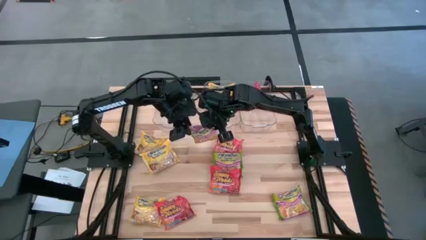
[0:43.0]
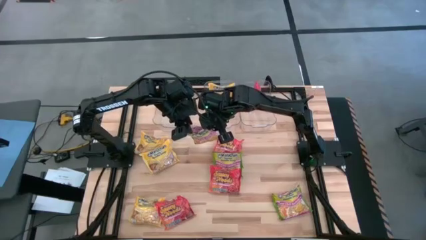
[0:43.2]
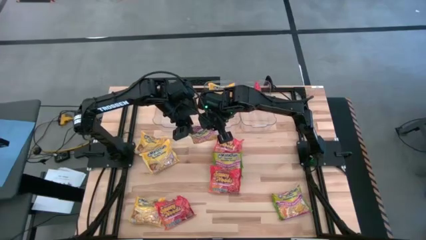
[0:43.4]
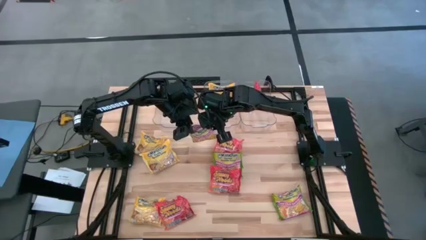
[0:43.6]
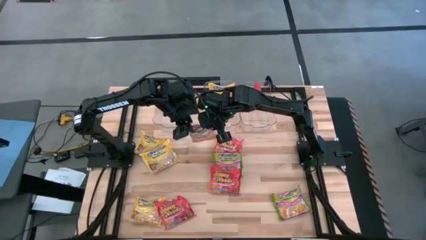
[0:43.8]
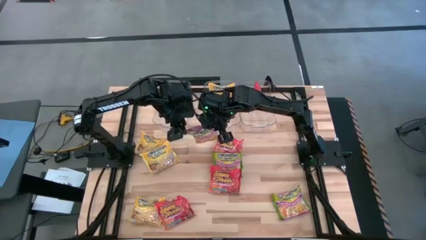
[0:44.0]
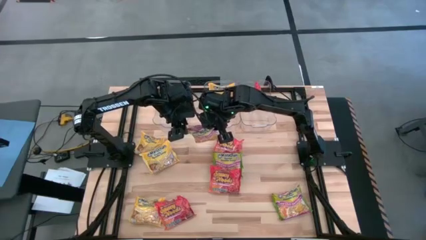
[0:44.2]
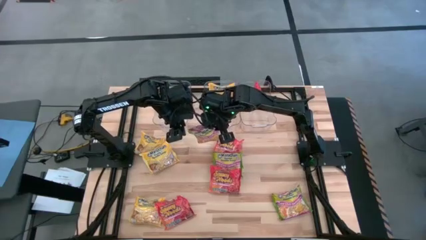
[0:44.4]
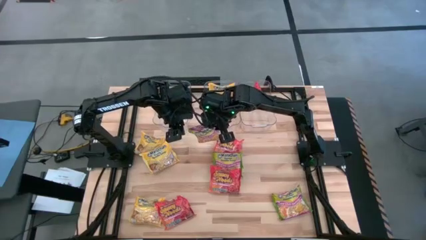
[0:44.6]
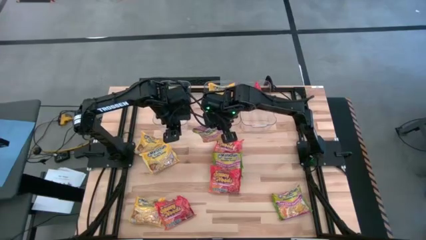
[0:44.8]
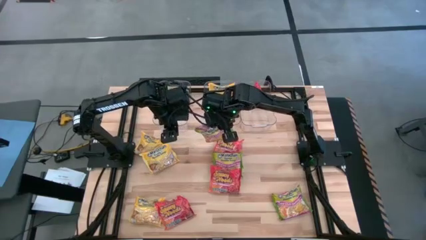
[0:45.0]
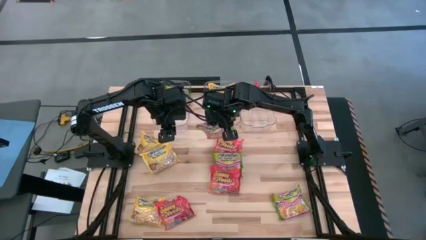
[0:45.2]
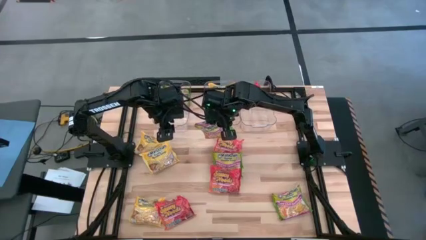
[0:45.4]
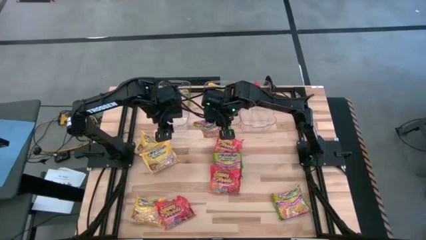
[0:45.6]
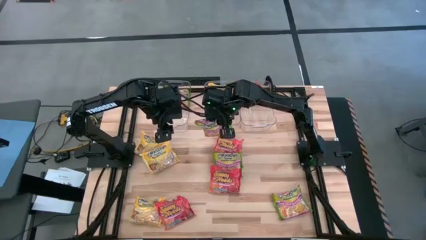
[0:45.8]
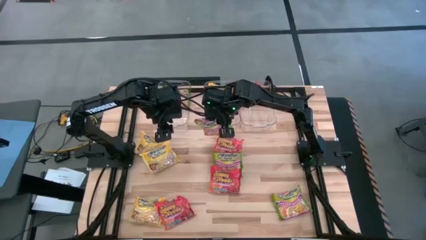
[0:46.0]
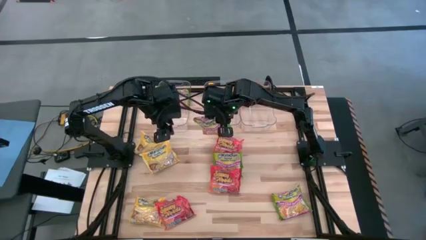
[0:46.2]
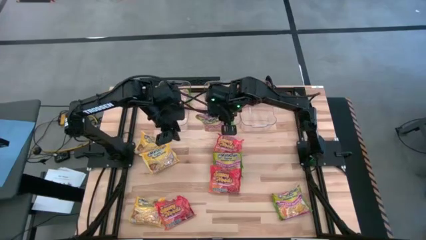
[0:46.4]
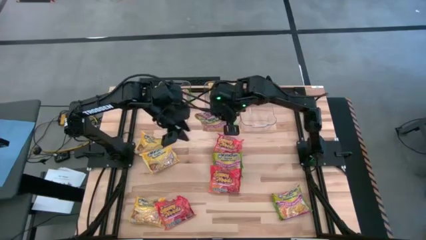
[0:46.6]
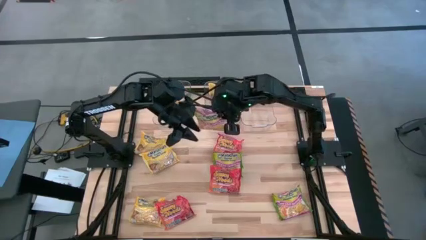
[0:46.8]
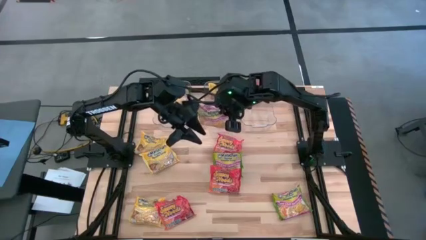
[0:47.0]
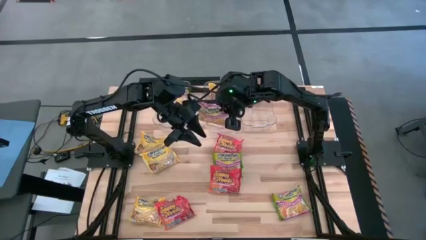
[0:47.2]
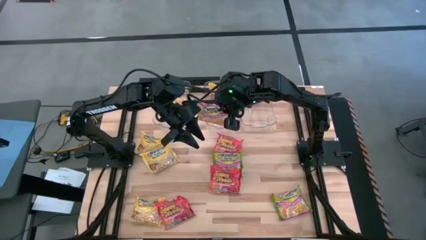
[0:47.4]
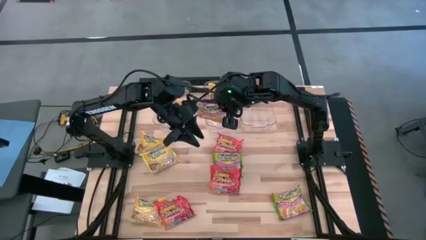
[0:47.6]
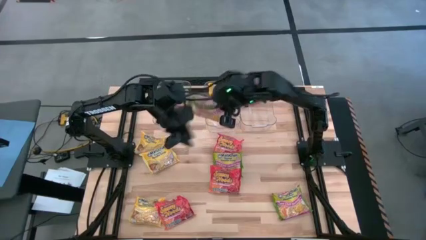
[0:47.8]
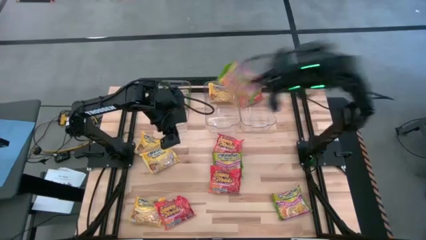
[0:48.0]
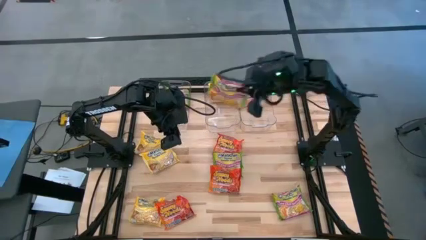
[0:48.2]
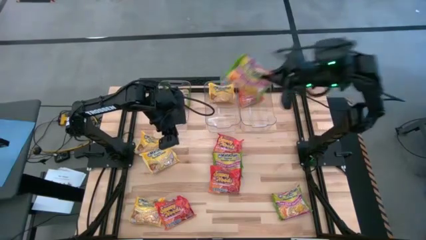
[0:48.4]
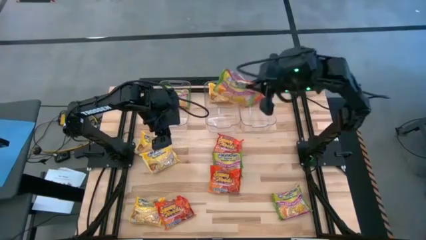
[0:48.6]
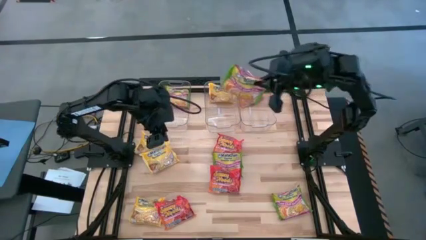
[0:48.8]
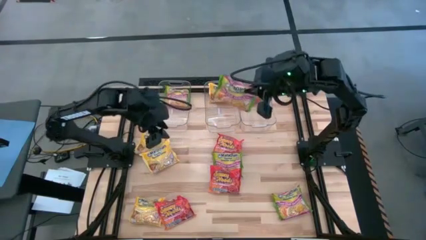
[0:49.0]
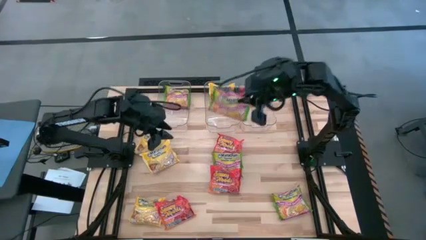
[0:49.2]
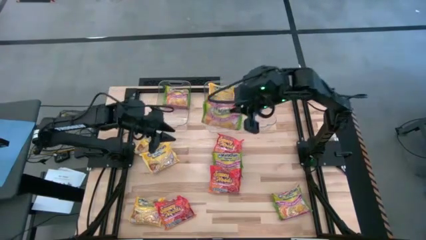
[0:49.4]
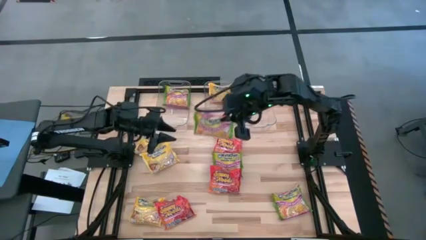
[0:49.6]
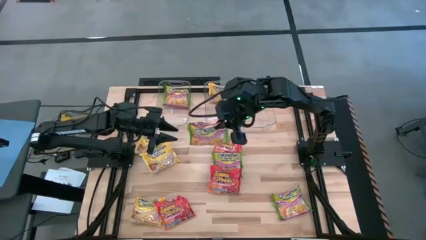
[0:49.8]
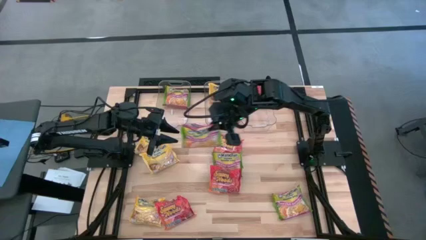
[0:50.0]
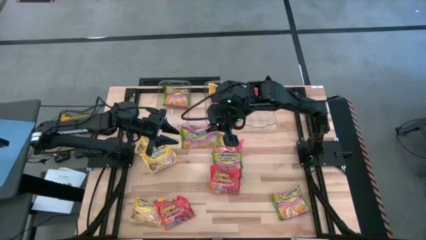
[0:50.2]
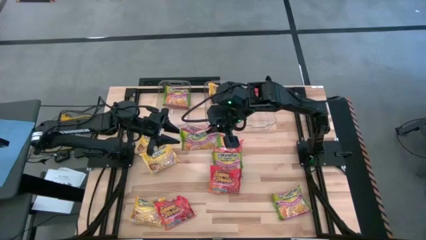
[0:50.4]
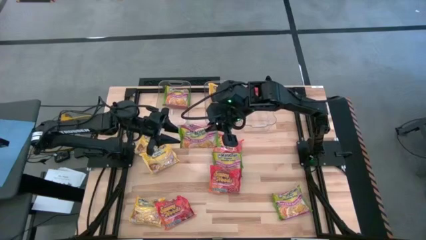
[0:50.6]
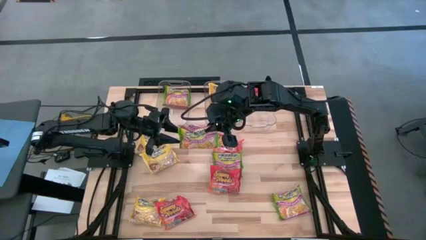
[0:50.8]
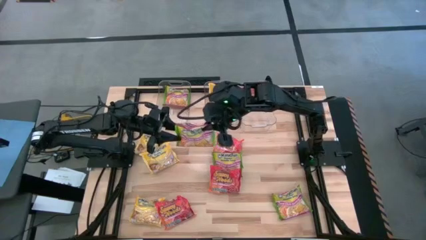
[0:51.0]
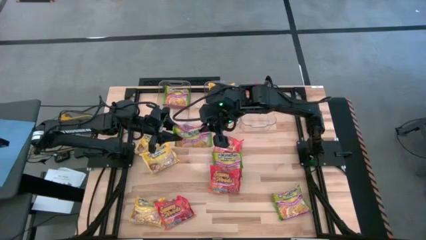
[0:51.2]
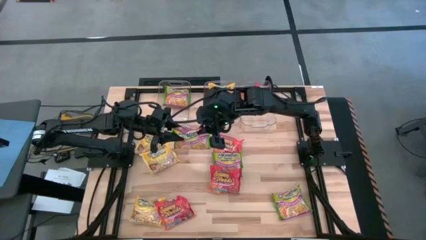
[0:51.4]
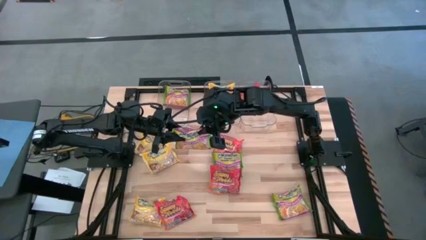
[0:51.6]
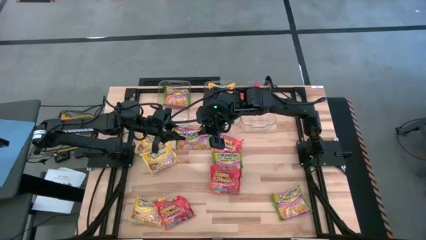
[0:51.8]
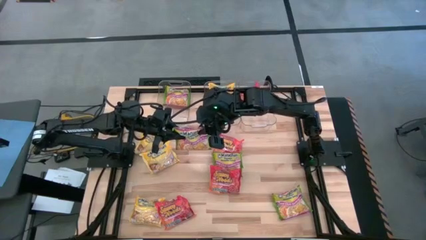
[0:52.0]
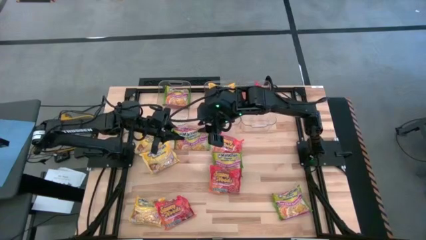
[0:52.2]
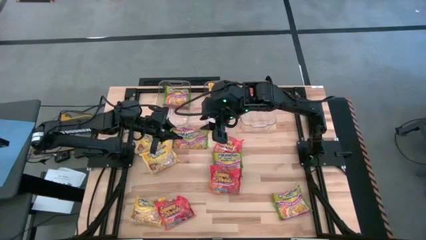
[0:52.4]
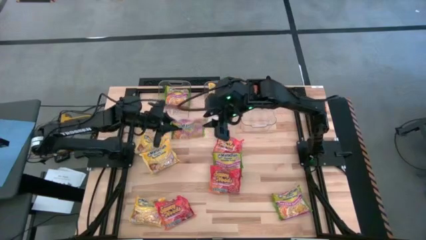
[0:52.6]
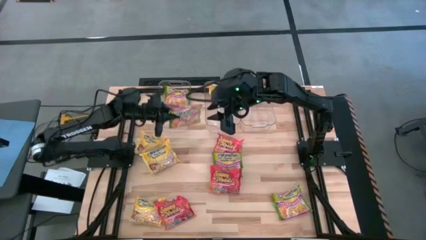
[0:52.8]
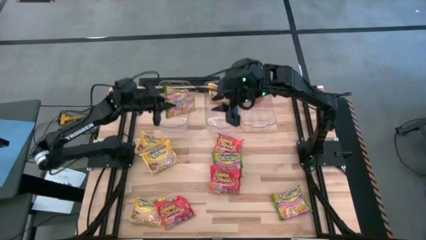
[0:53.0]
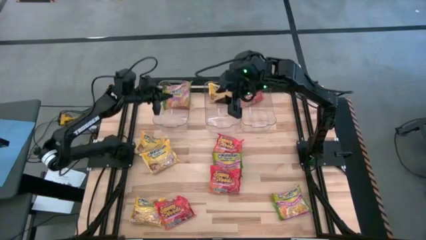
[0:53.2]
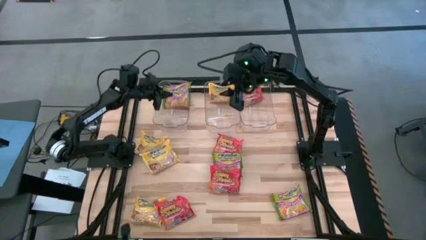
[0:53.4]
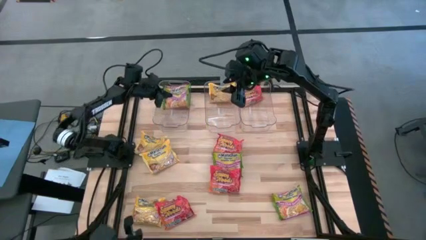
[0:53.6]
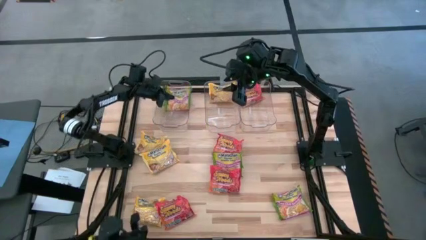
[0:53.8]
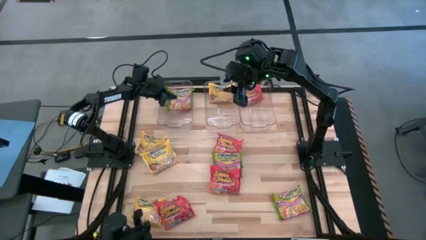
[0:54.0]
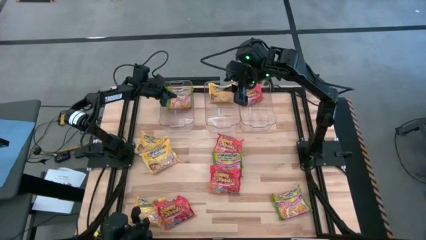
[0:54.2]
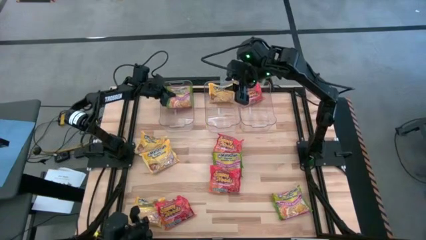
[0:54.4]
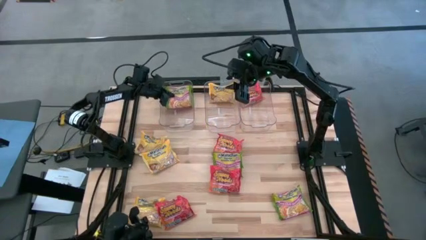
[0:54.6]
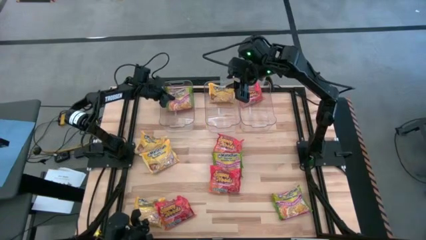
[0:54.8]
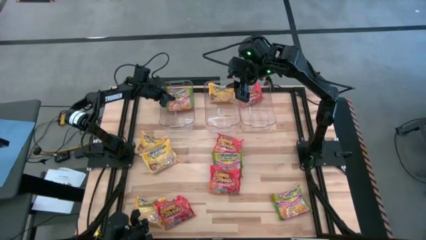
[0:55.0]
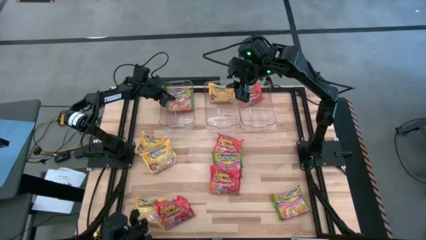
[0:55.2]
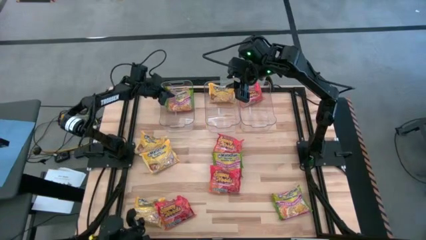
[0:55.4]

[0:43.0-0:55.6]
Task: Sort Maruchan noodles
Put the green noodle pack into the left transparent bin

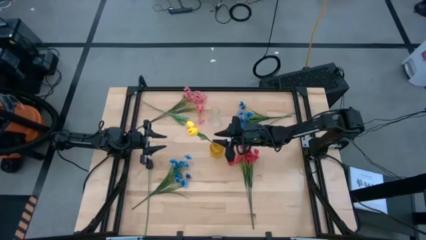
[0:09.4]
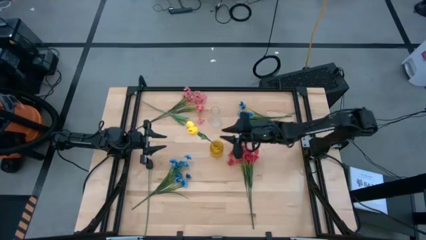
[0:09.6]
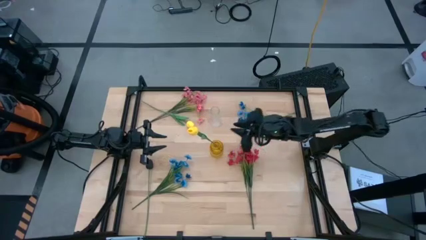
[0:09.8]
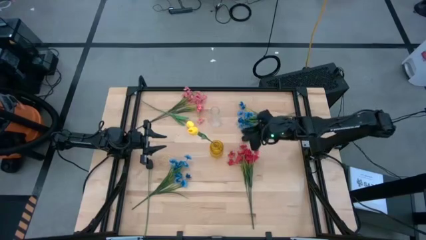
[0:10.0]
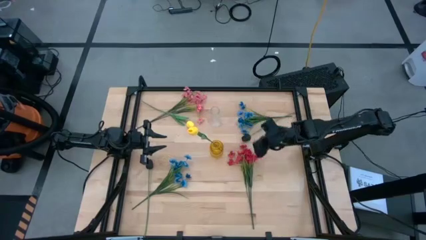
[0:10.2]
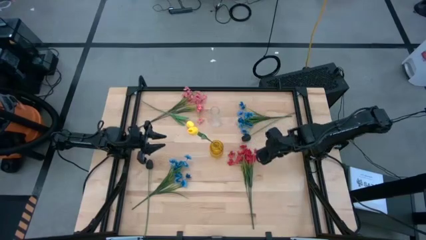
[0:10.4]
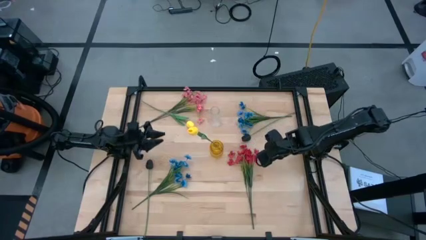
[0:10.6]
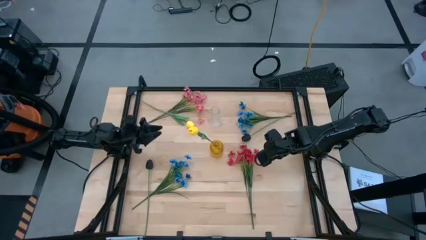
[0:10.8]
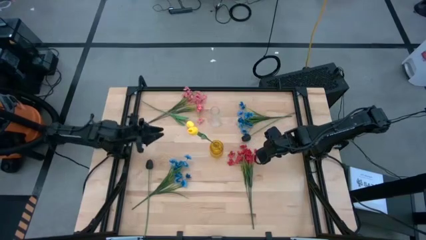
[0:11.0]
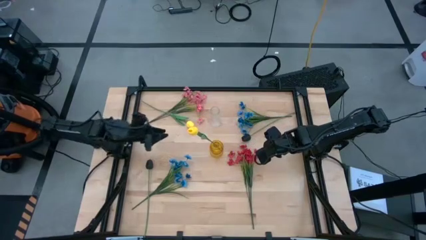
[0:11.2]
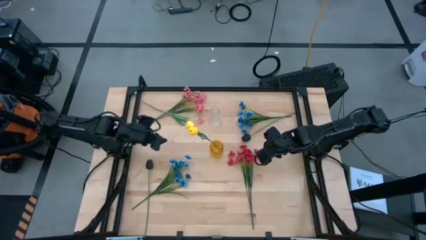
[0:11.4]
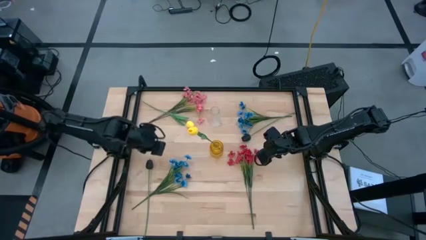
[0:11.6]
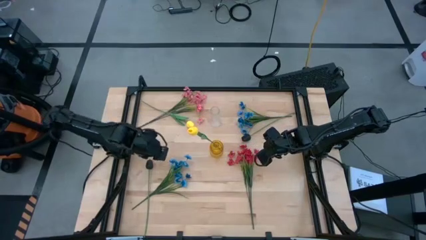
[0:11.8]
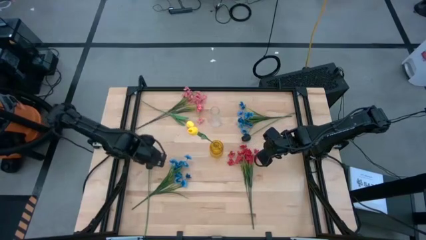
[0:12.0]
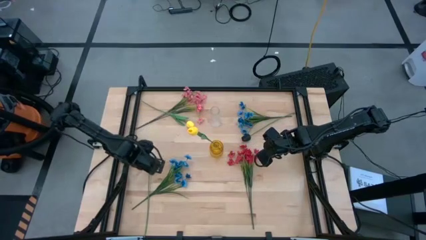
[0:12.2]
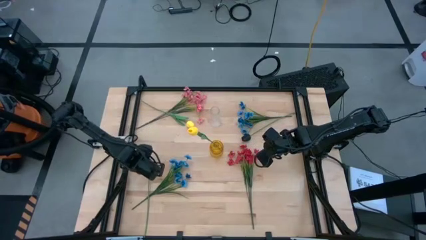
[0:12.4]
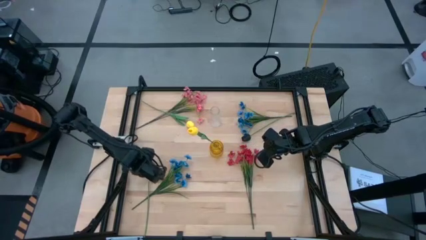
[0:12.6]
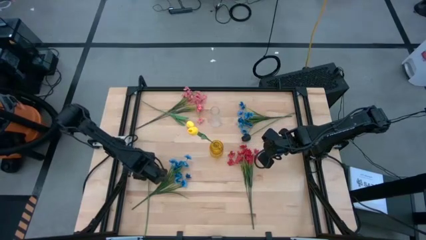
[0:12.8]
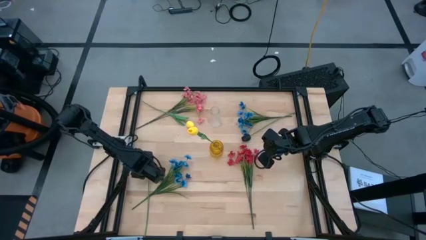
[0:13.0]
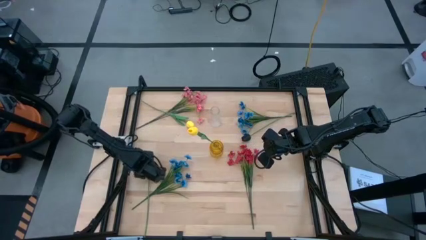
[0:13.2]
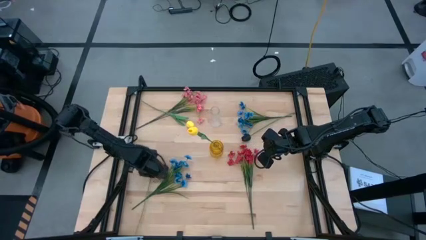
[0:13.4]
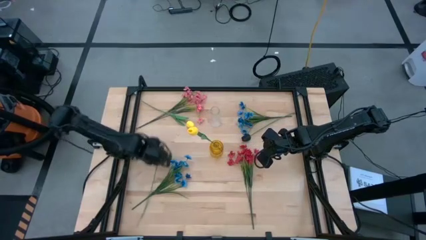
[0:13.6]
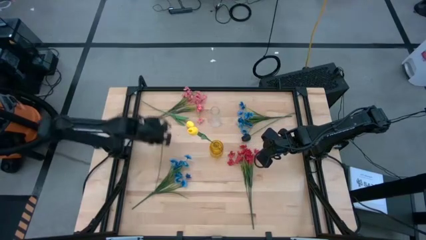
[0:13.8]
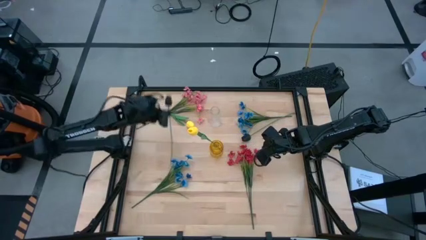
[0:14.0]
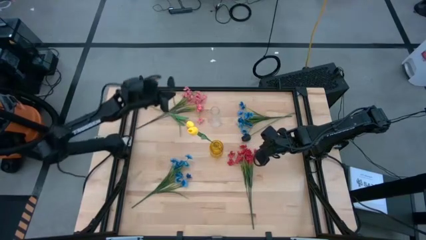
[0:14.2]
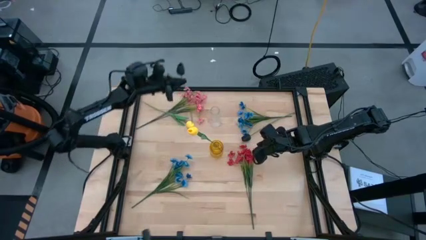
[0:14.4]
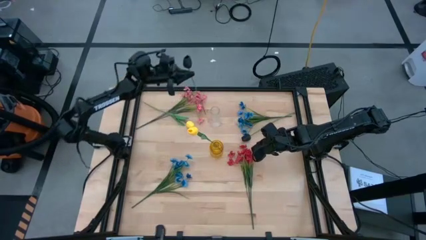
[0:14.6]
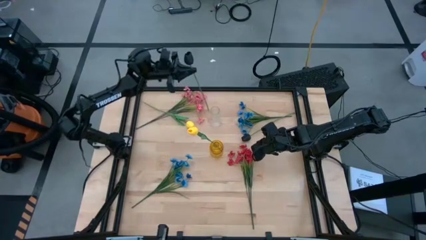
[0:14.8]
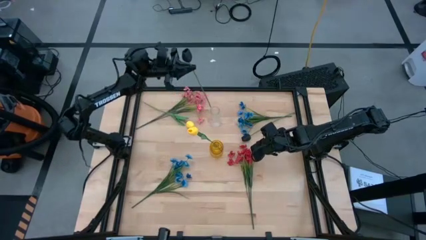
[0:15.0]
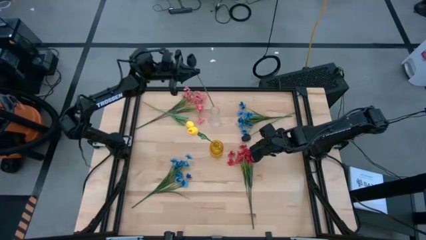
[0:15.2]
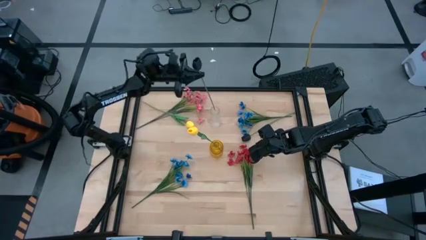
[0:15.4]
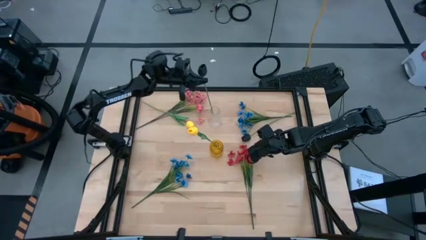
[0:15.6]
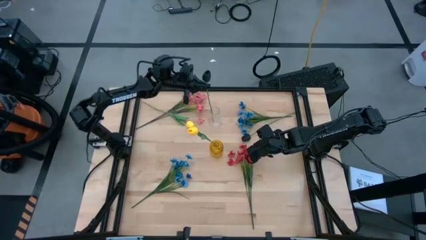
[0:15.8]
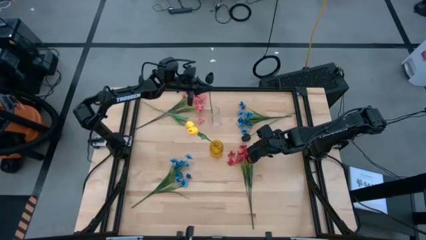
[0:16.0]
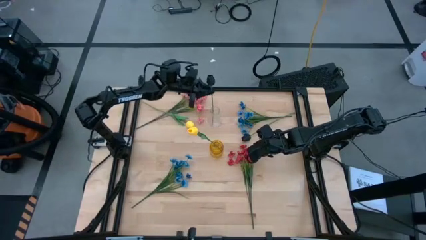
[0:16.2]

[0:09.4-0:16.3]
Task: Sort flowers into vase by color
Put the left black flower into the transparent flower vase
